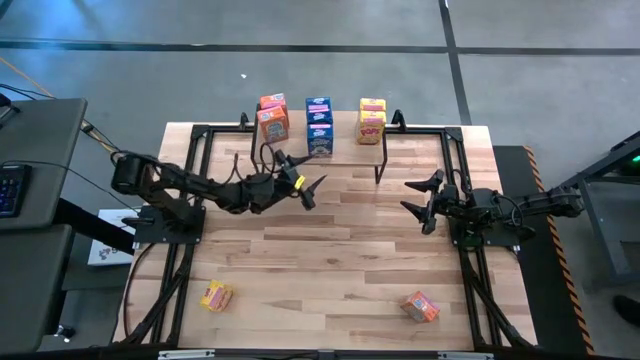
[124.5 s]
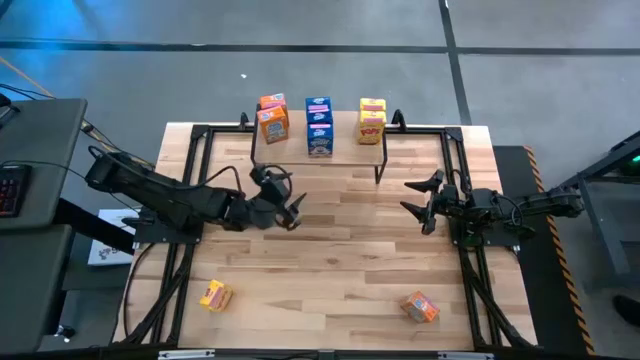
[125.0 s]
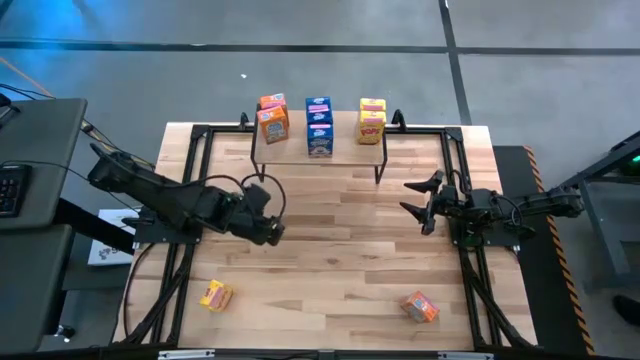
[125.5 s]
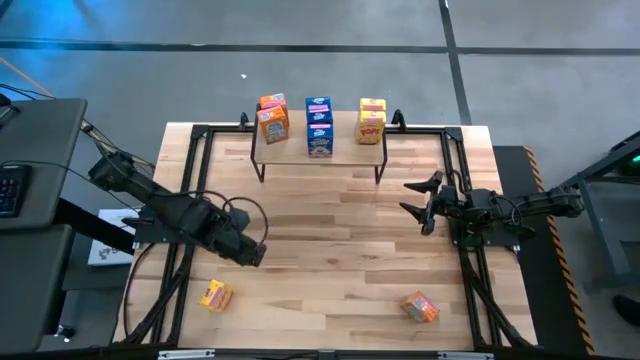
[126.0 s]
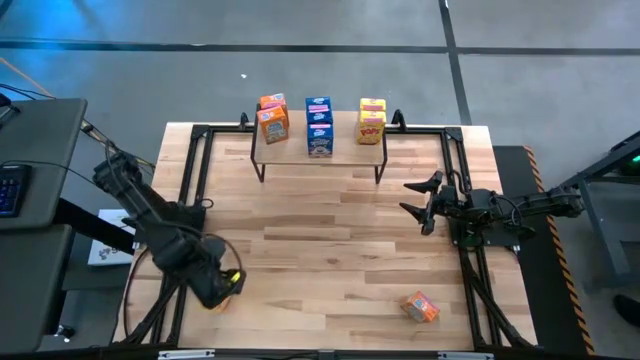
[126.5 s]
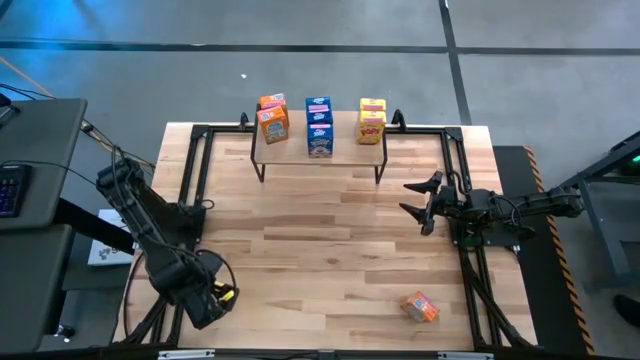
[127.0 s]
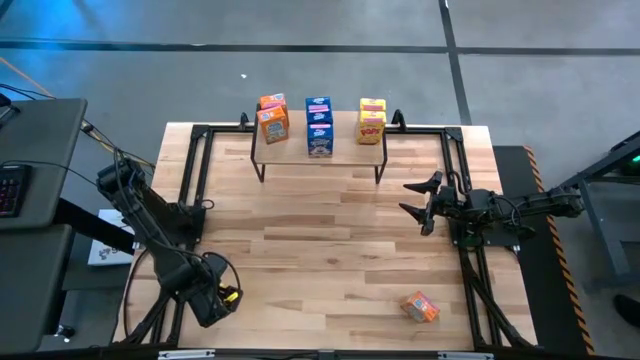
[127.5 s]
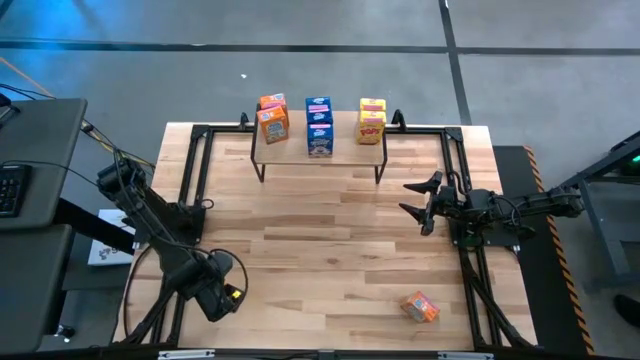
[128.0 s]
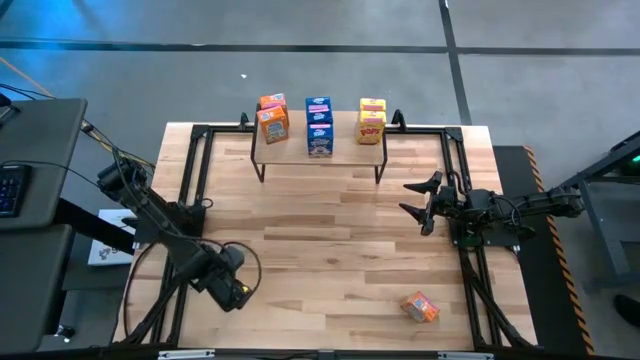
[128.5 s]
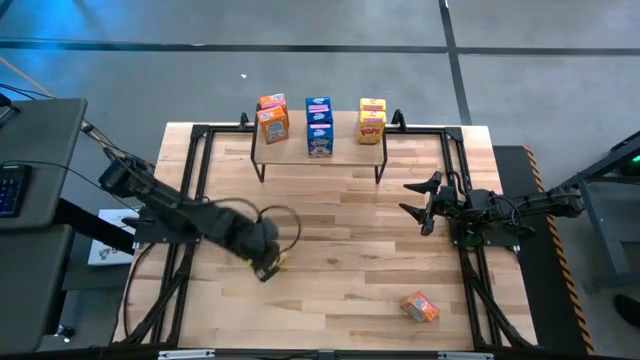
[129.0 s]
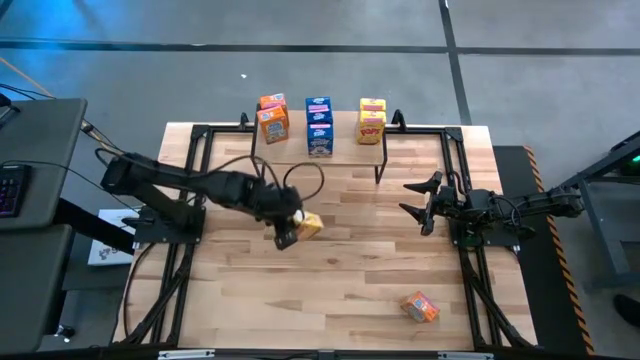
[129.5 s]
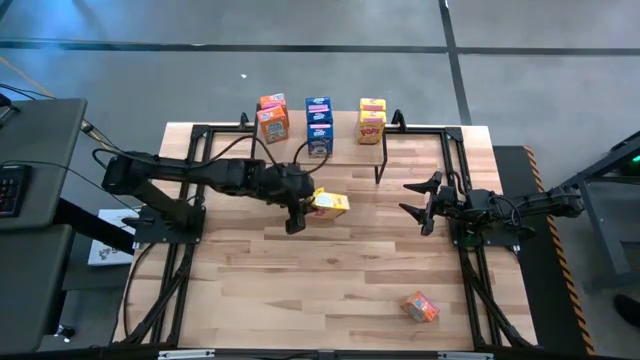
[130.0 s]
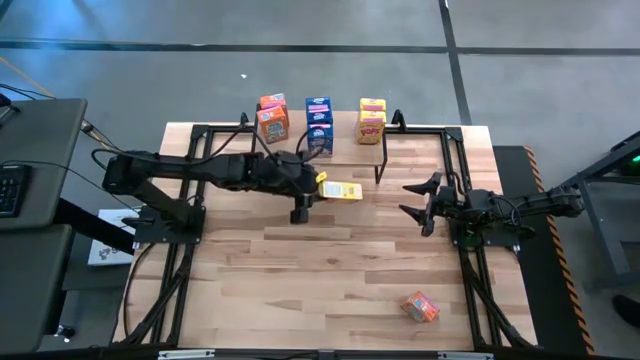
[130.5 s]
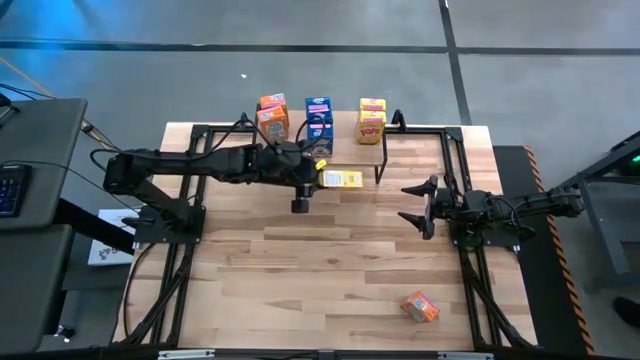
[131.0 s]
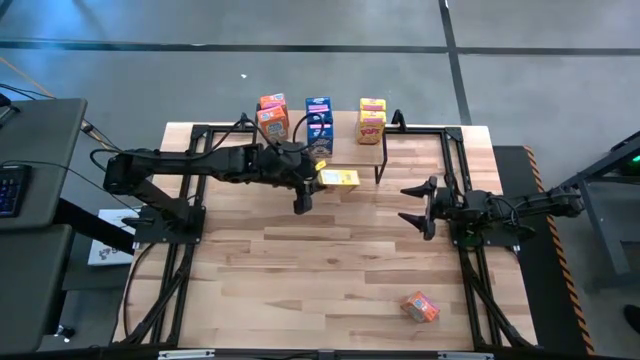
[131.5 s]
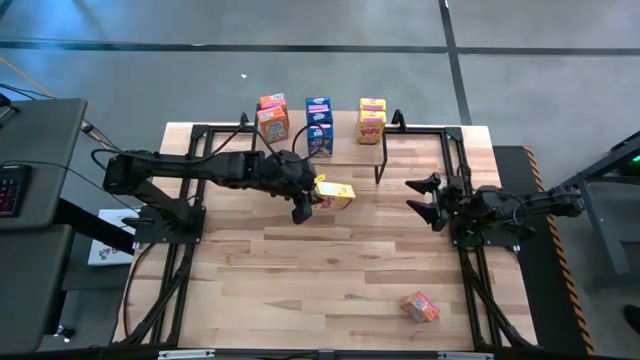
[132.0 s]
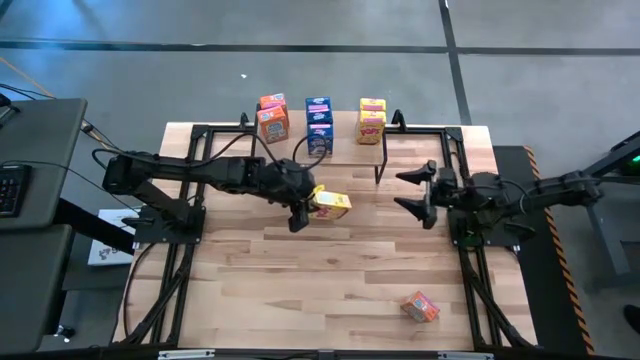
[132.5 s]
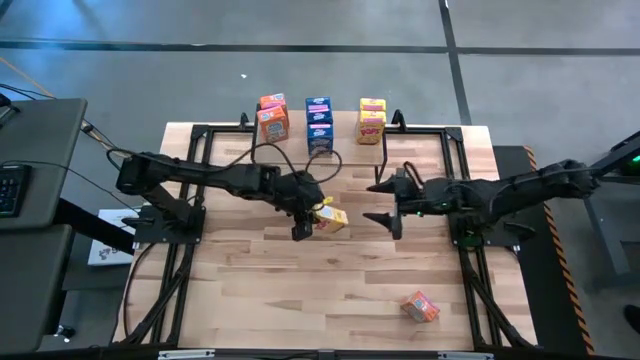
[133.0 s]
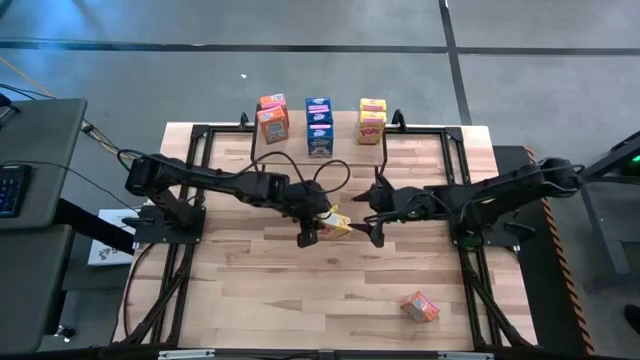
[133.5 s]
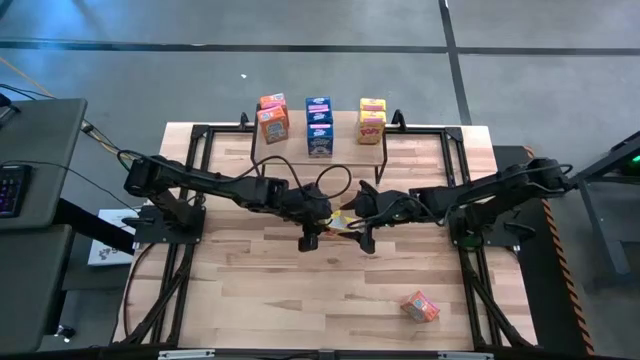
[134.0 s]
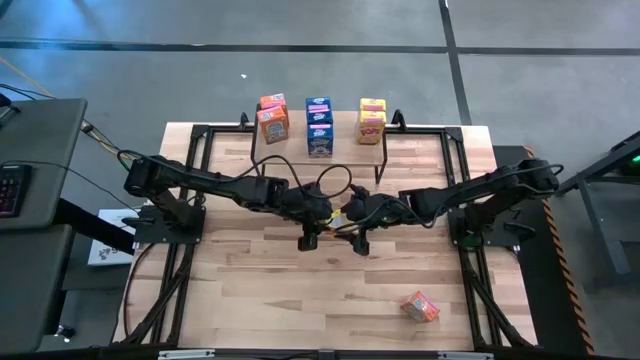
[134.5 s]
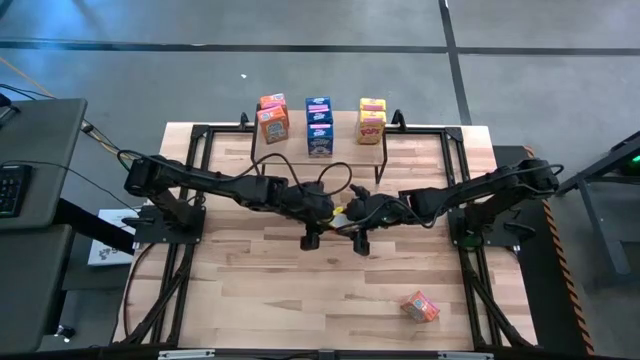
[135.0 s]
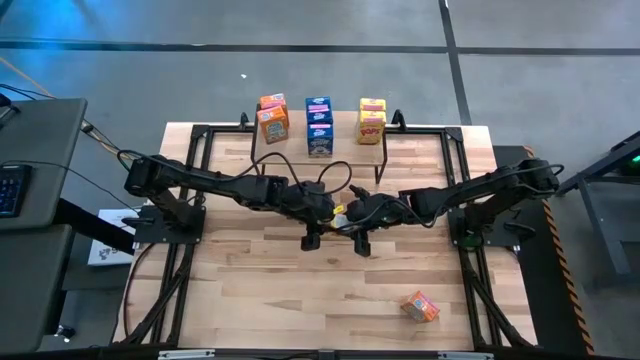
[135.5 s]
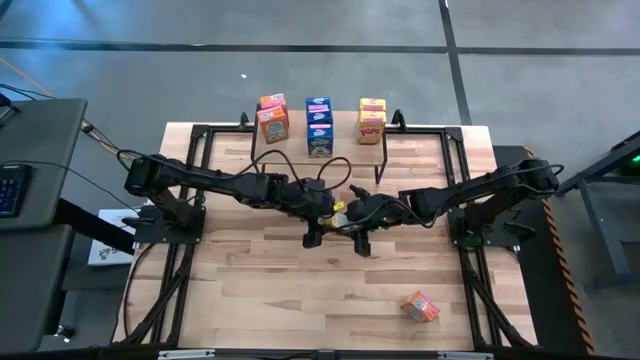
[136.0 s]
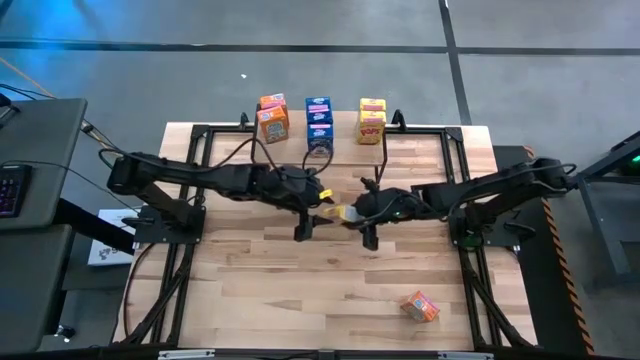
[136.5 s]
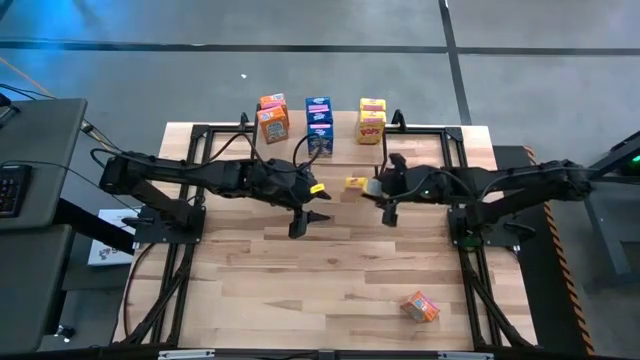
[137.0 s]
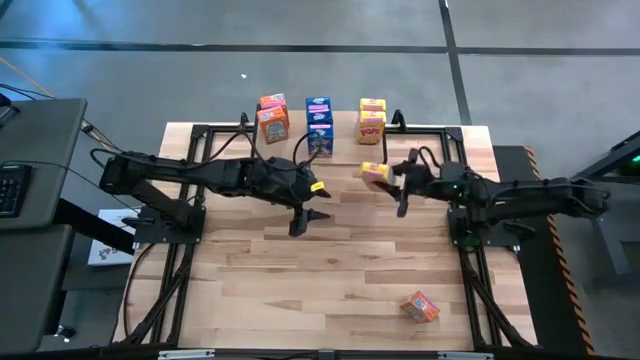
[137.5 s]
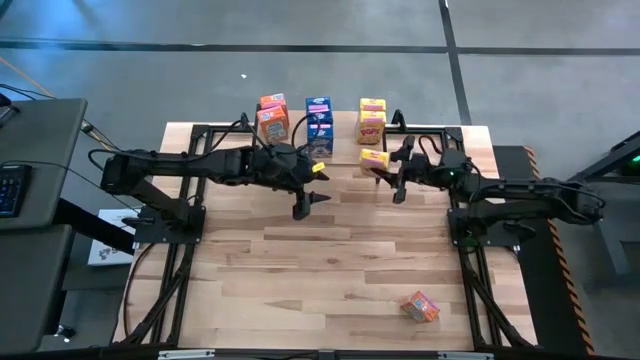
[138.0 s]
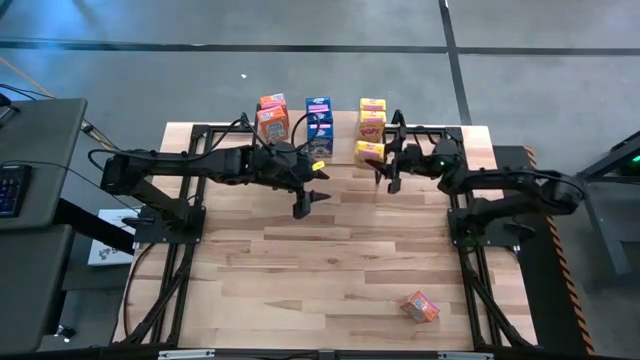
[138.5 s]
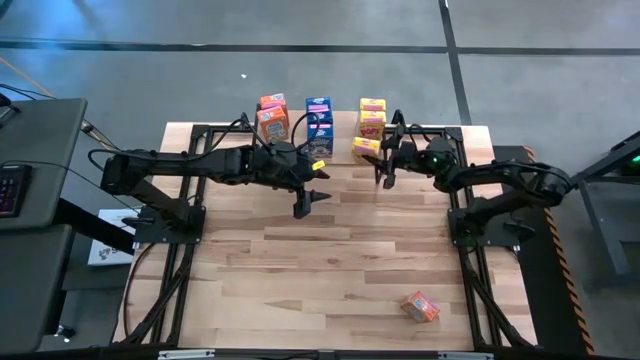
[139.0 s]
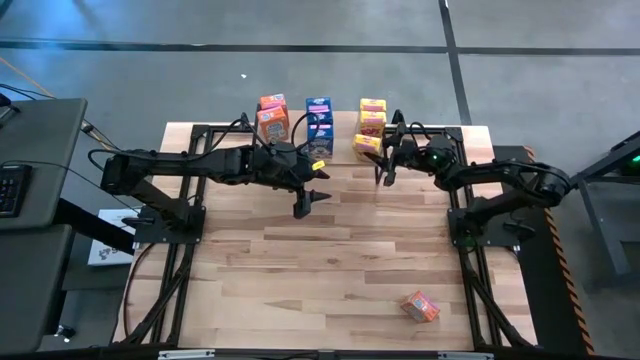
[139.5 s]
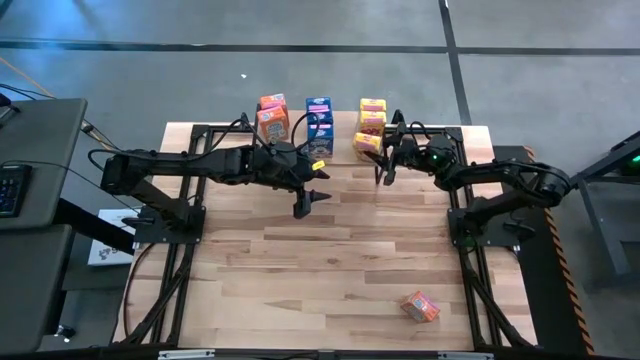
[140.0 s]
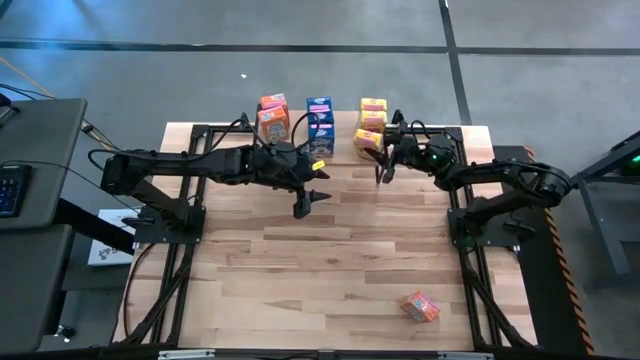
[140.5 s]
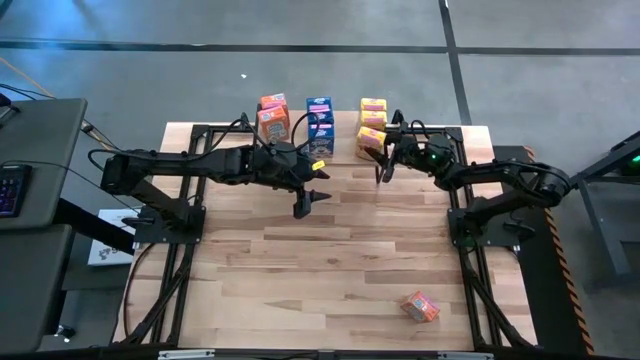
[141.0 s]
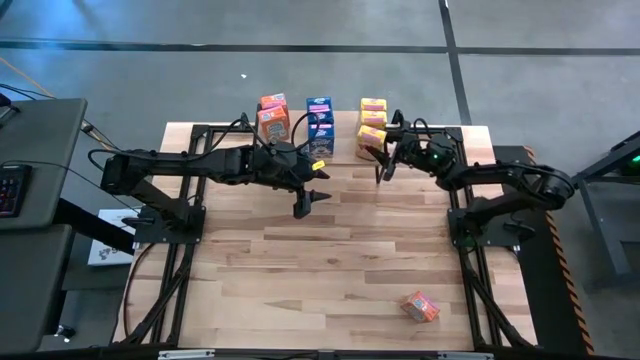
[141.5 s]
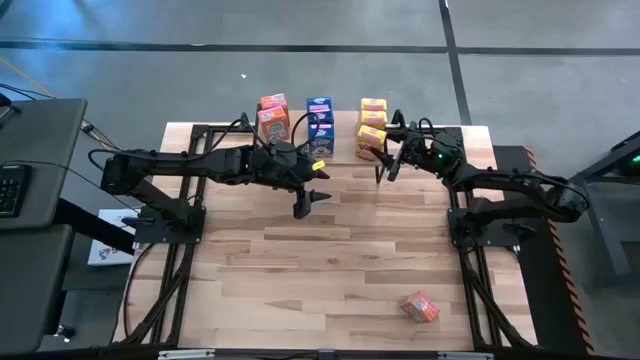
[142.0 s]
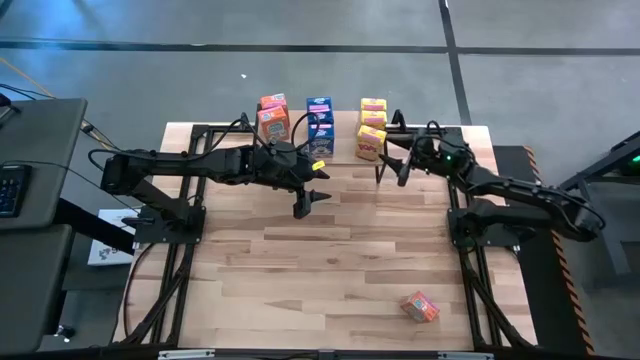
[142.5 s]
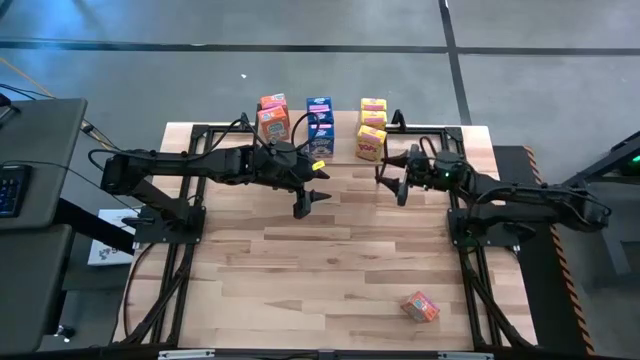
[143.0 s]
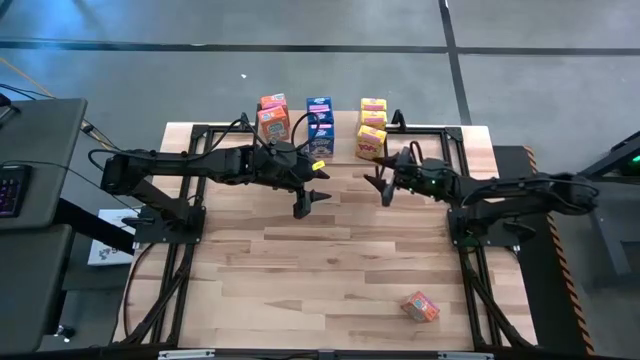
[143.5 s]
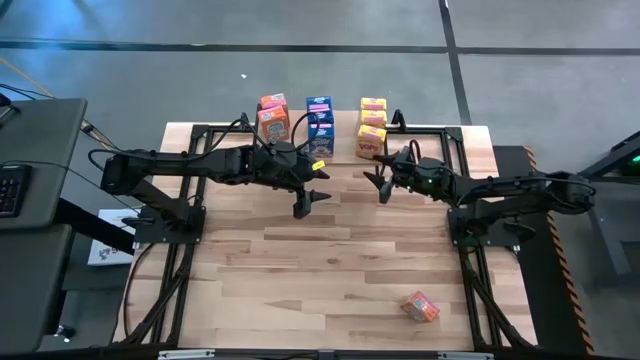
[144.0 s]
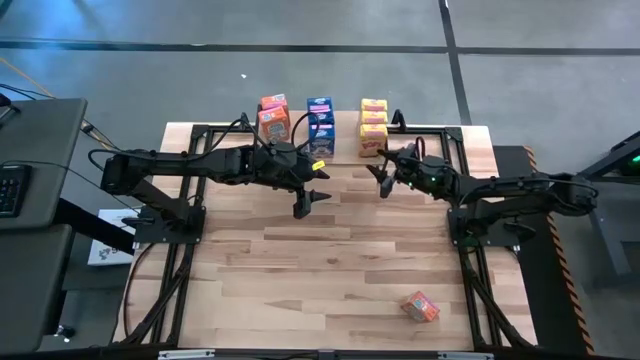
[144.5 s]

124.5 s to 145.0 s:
Task: Stack cereal on shelf
Put the yellow cereal box on the shelf aligned with the other yellow cereal boxes

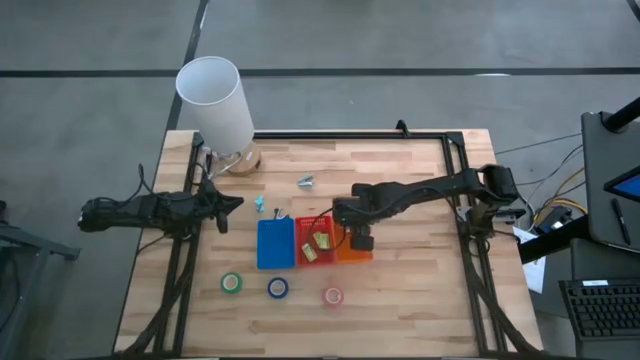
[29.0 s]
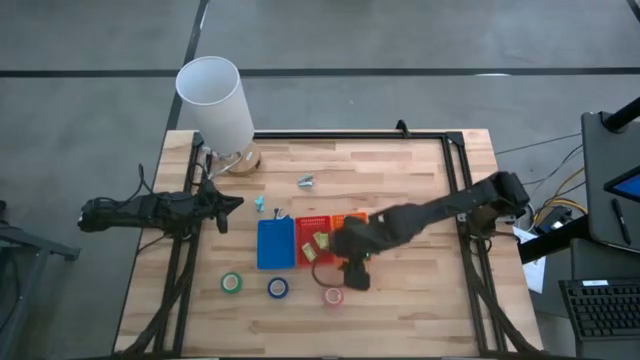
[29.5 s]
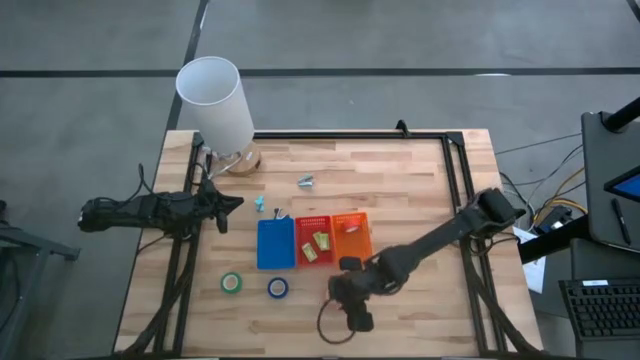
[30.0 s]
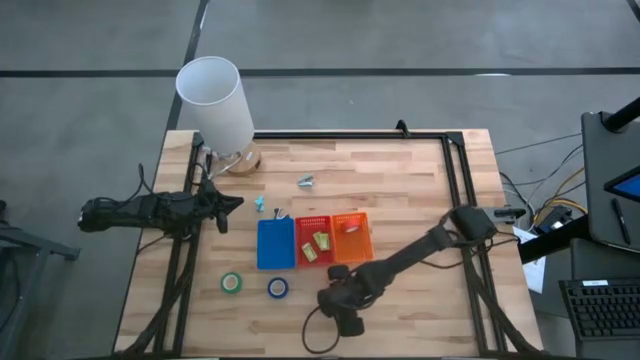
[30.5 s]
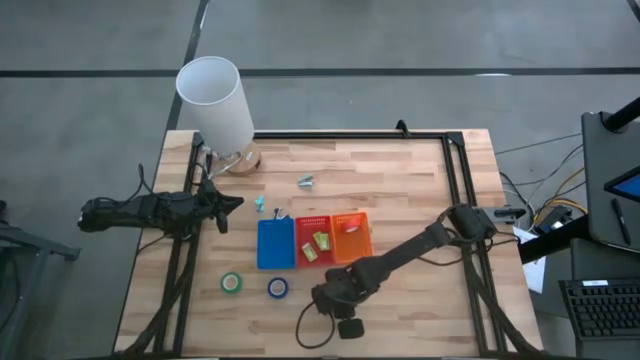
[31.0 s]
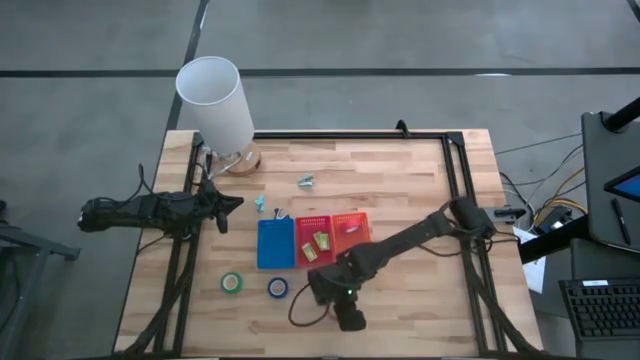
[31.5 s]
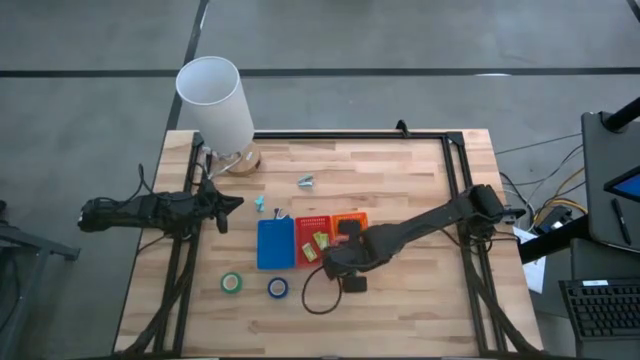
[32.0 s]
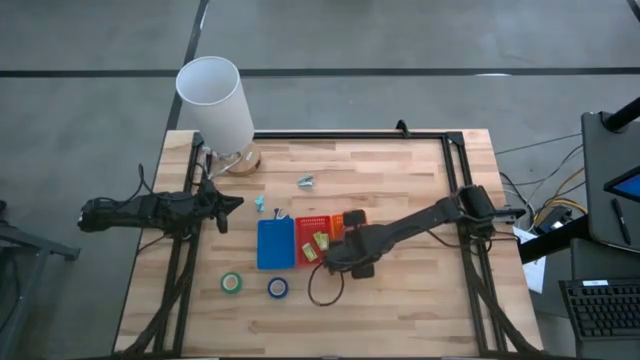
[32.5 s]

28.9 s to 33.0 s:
Task: Pick and place Stapler, Stapler remover, tape
Put the pink tape into the orange bin
